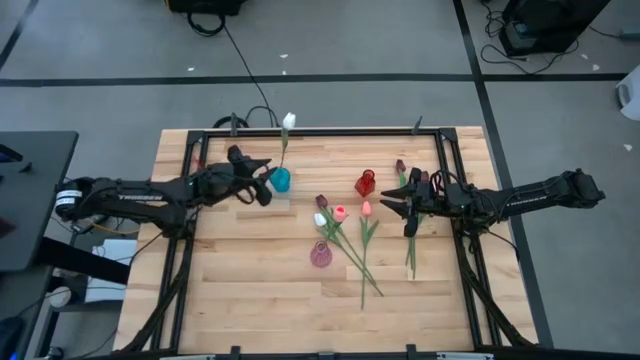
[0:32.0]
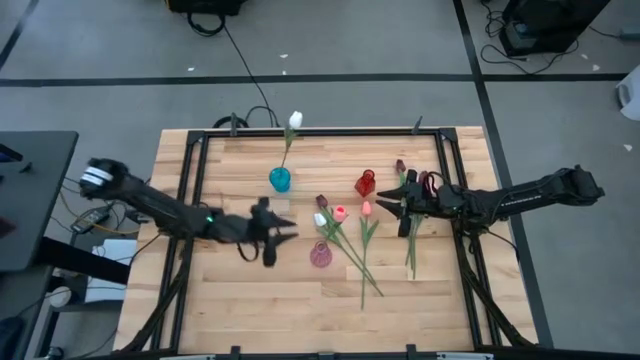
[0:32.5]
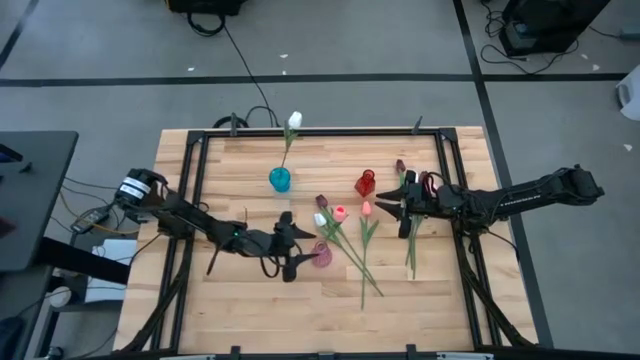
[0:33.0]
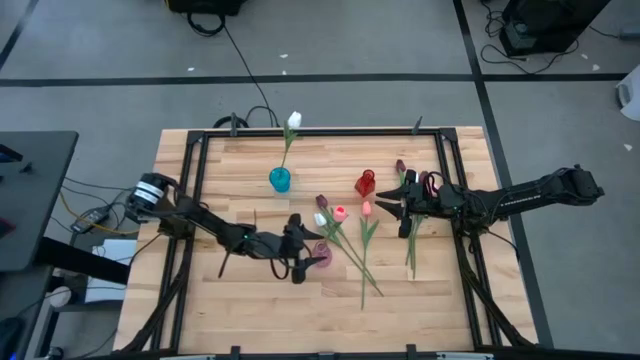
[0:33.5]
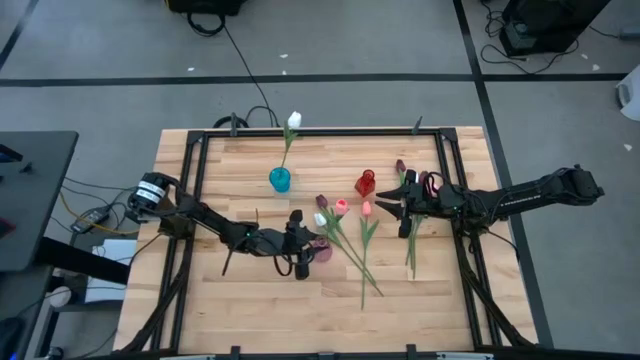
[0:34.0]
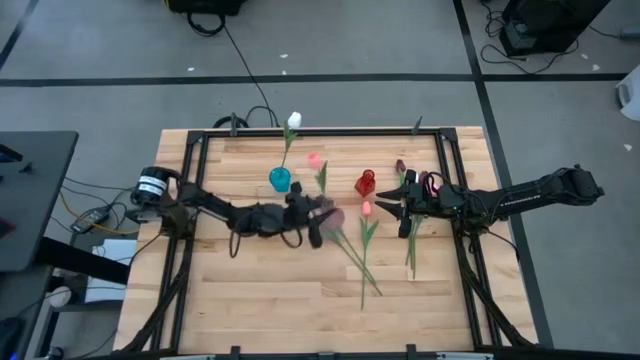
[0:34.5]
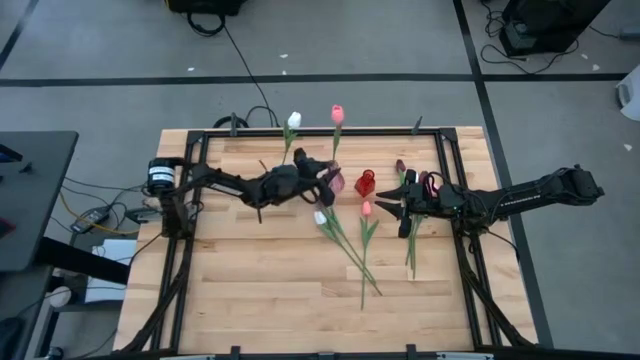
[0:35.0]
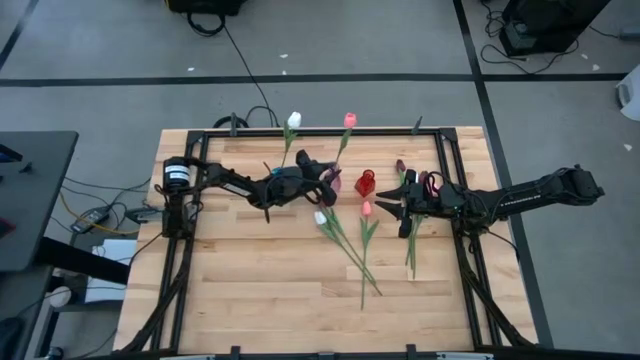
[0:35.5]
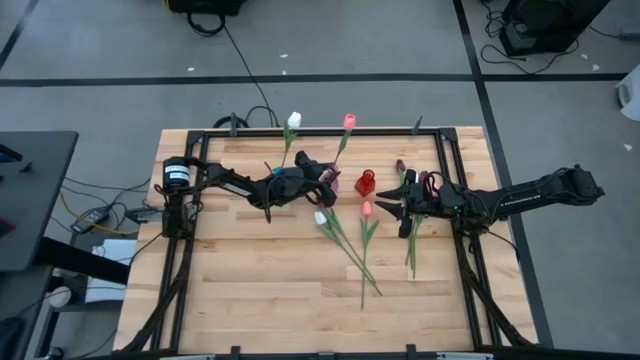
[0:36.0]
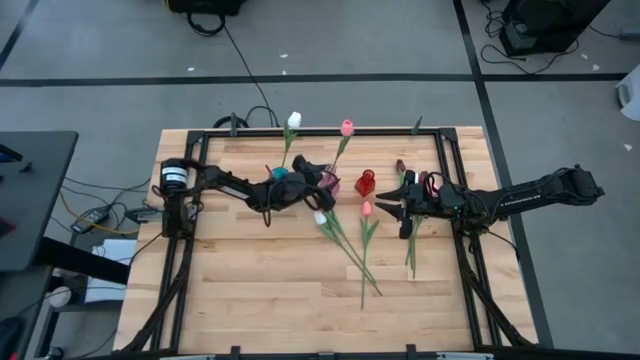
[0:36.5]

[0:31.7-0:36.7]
Task: Sort flowers into vase by color
Move the pink vase from the middle to the top of the table

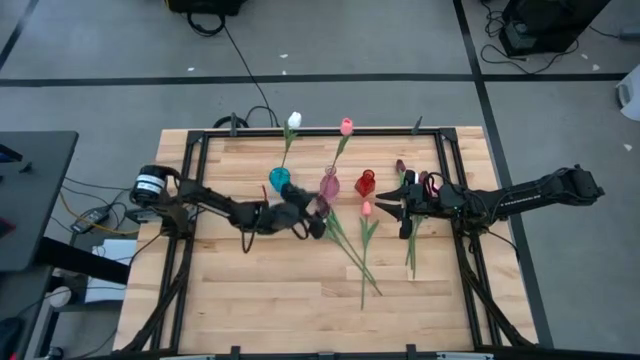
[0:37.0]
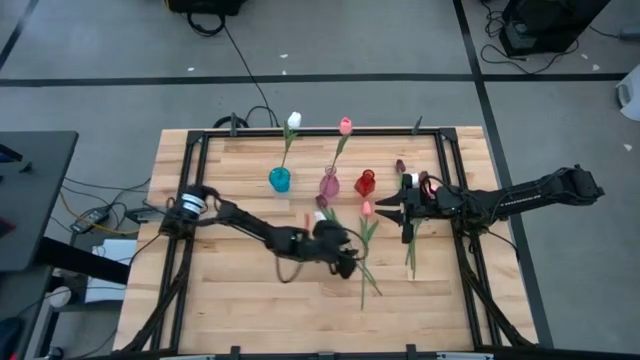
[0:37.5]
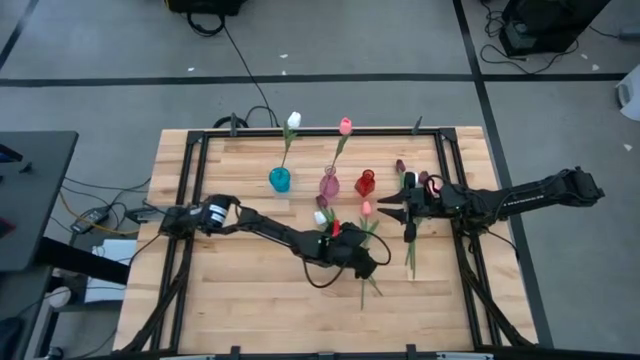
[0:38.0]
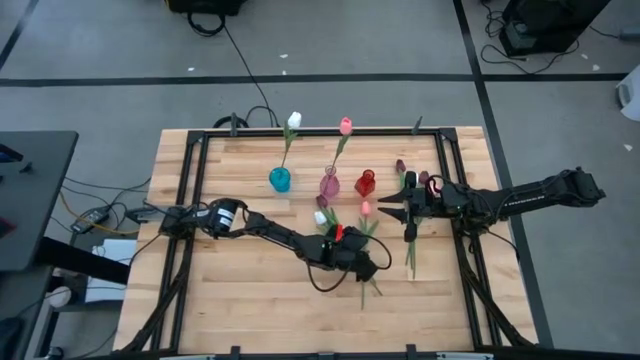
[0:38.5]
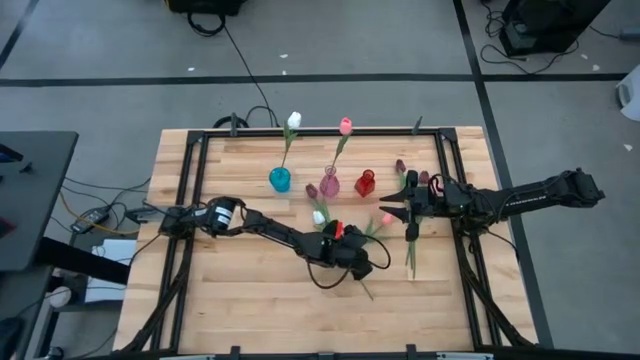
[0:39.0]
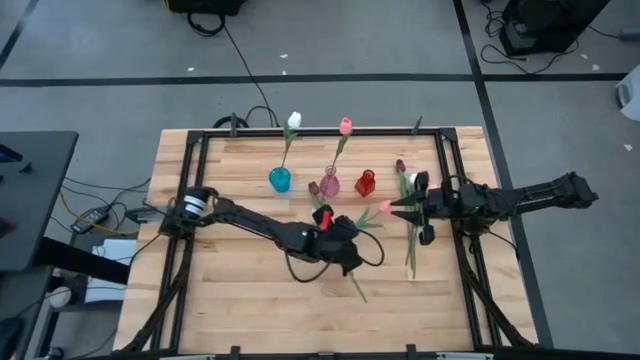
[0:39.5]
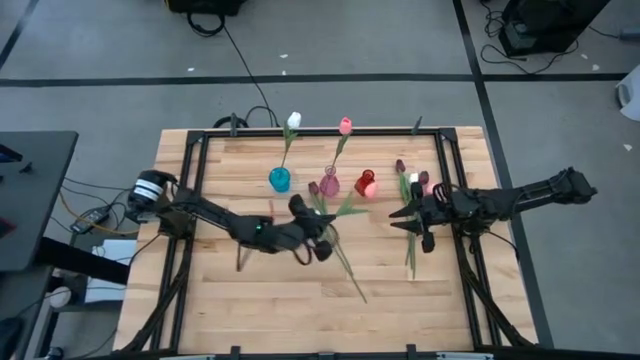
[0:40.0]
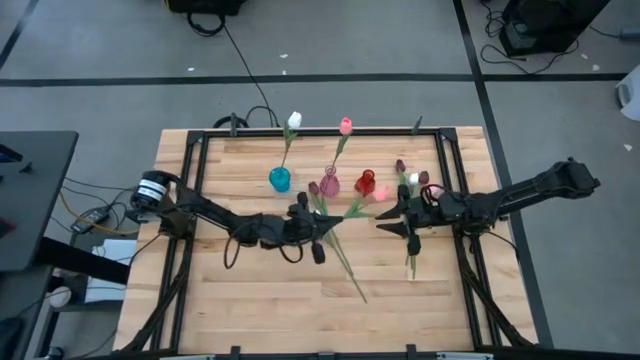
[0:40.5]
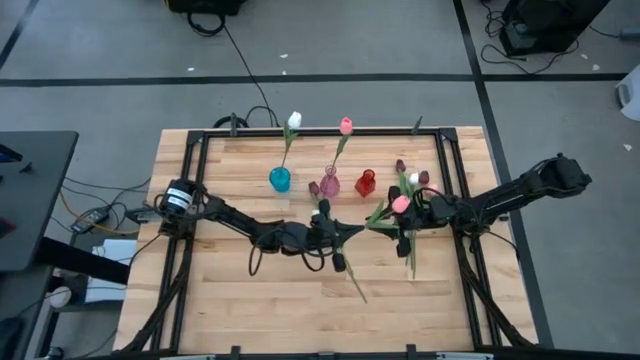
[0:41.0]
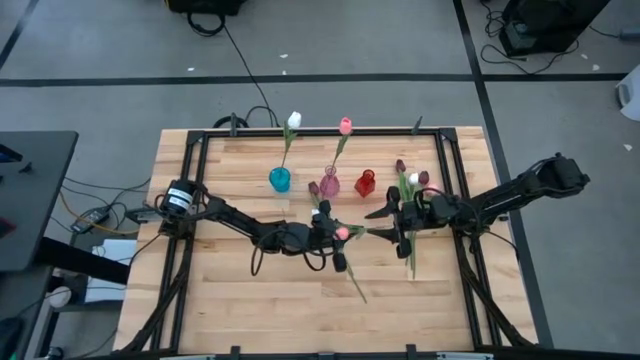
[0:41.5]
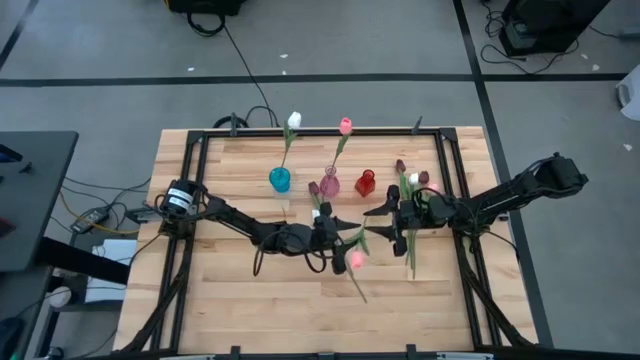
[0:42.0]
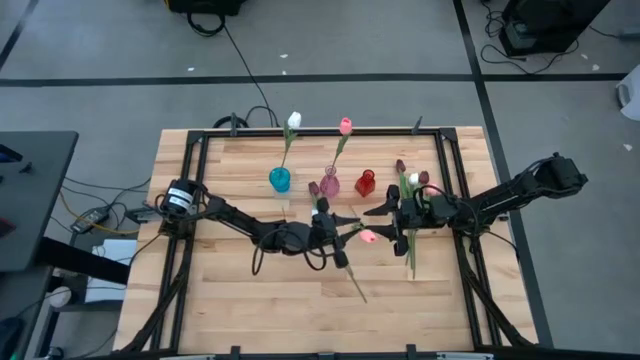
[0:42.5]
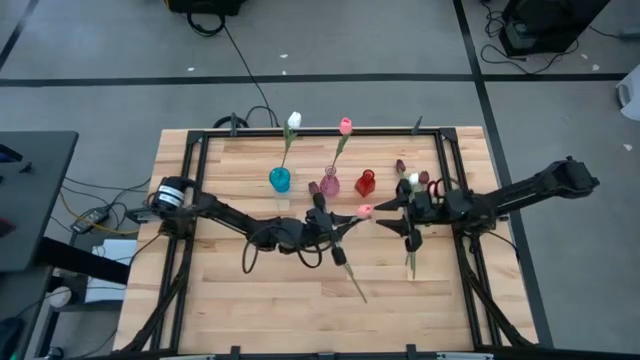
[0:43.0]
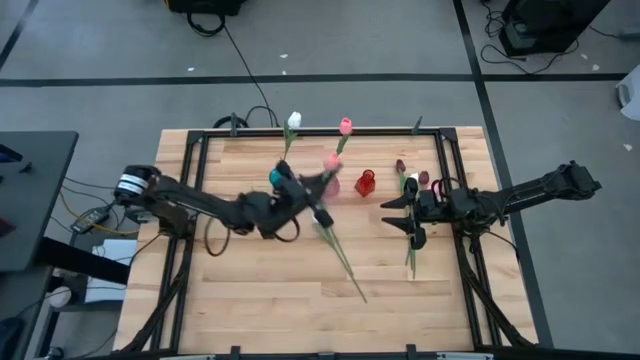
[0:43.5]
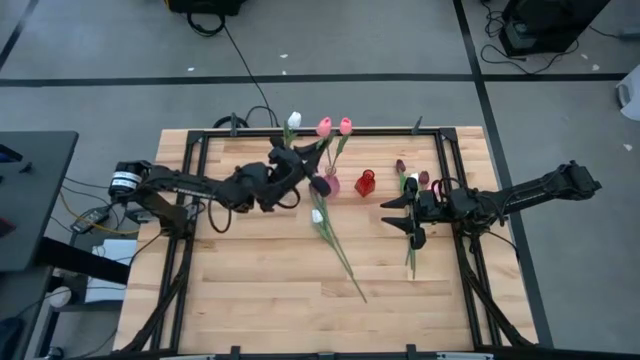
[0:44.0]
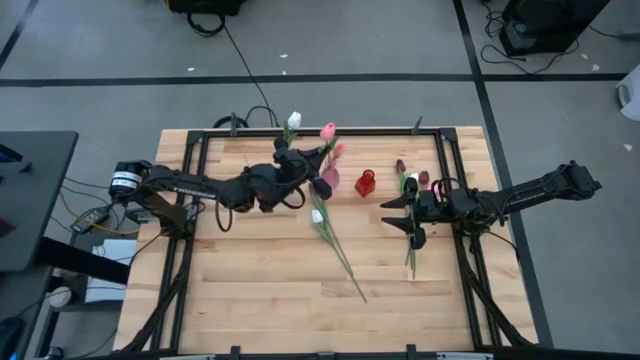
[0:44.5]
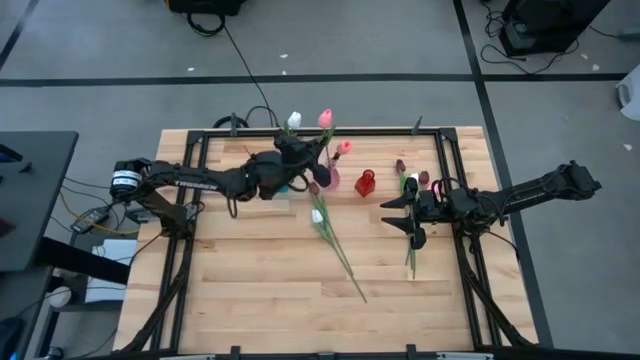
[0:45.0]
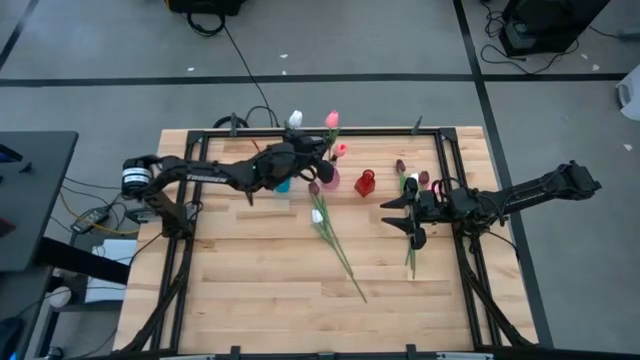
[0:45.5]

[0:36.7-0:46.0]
Put the left pink tulip into the pink vase

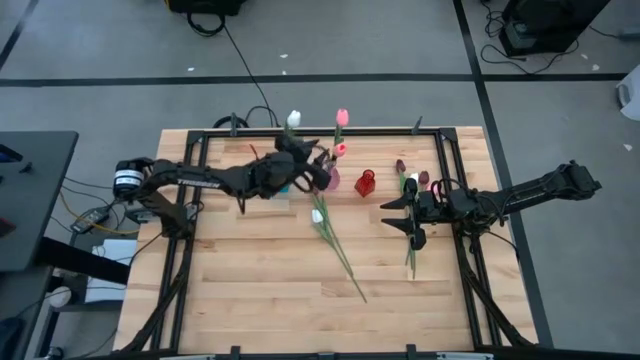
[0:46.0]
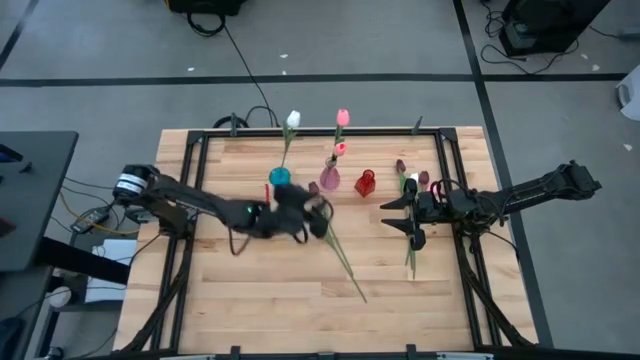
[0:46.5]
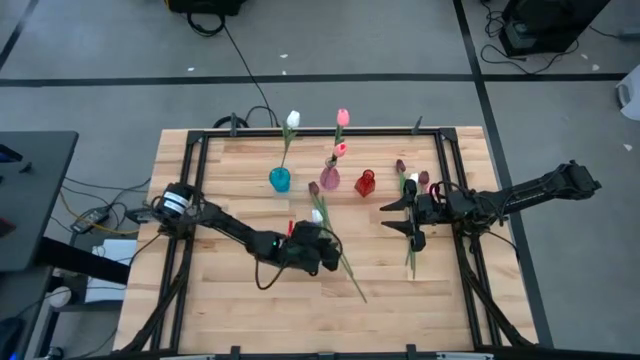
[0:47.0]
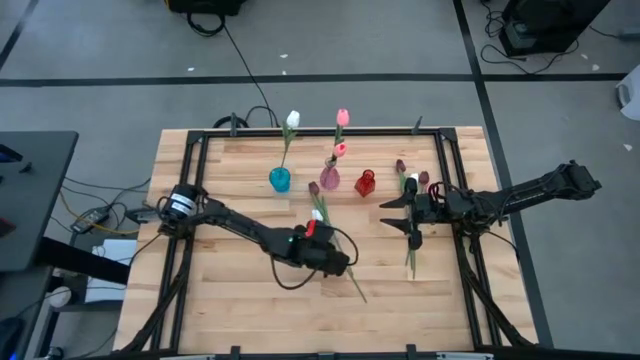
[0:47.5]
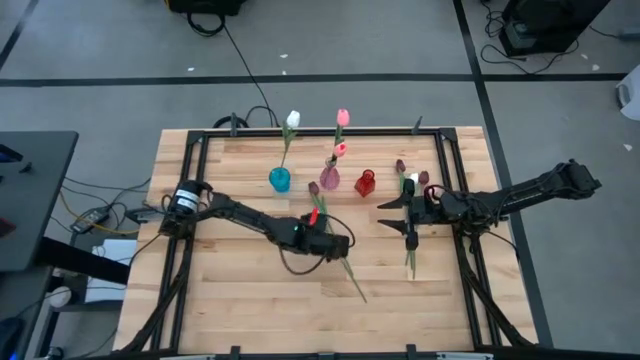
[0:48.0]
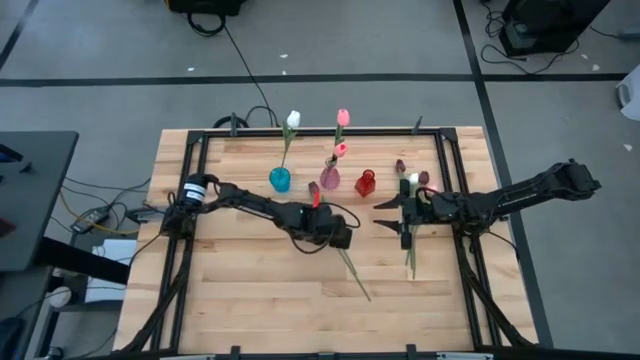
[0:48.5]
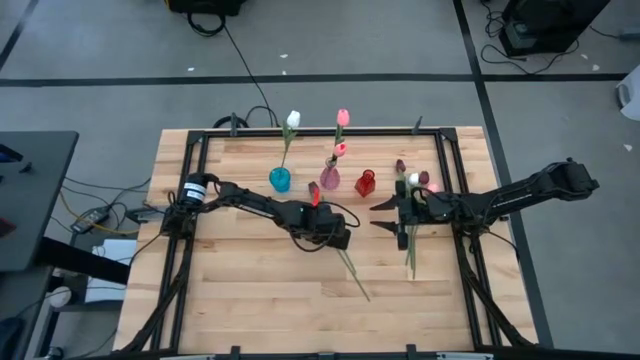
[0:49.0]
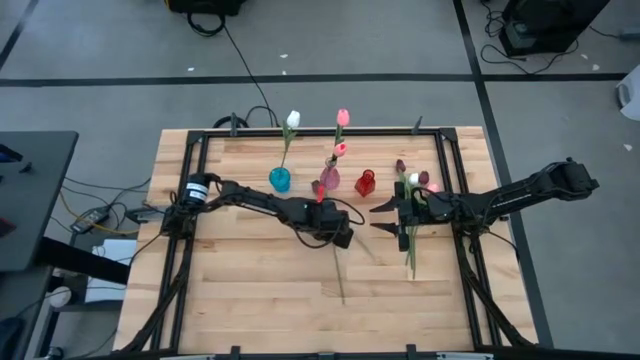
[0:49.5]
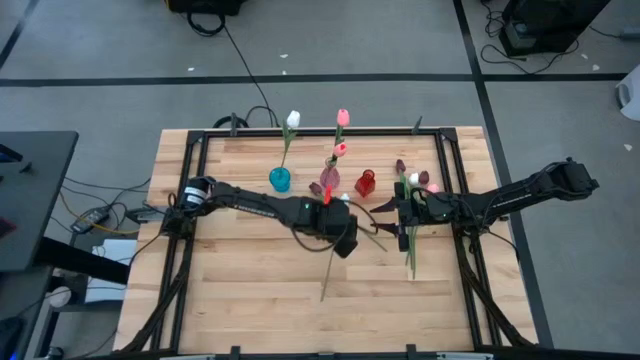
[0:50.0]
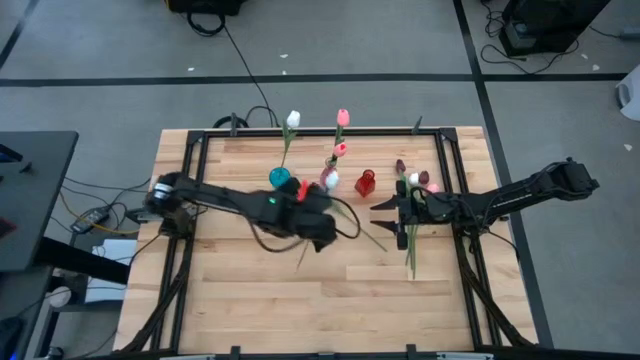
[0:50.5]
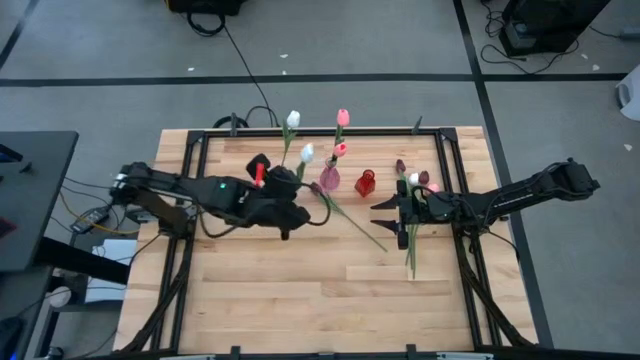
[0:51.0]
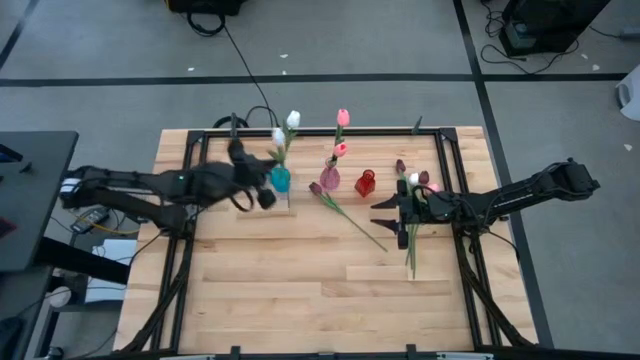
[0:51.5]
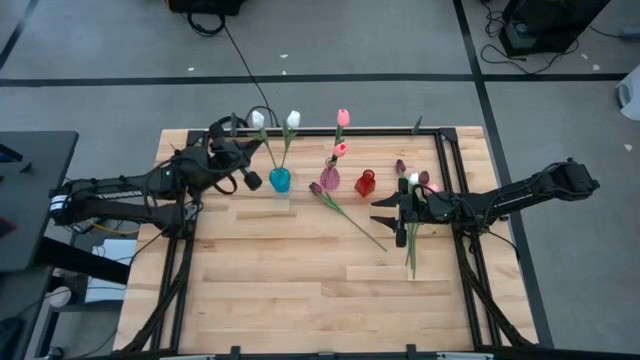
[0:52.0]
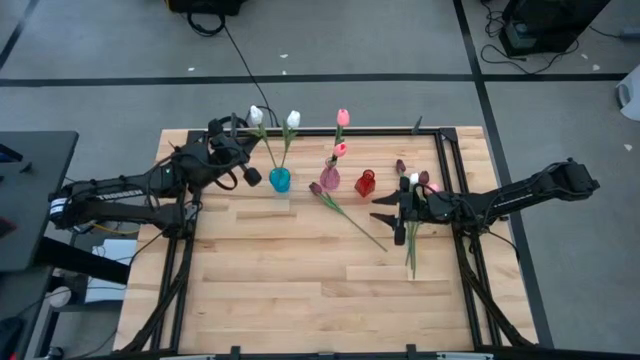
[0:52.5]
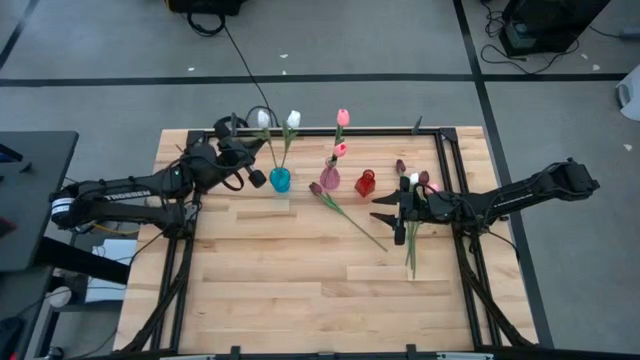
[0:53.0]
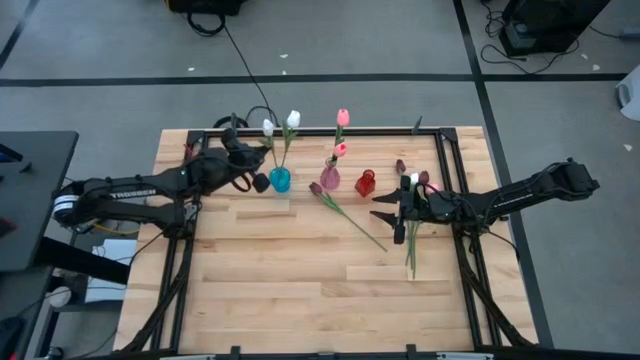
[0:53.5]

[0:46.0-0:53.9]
Put the left white tulip into the blue vase
